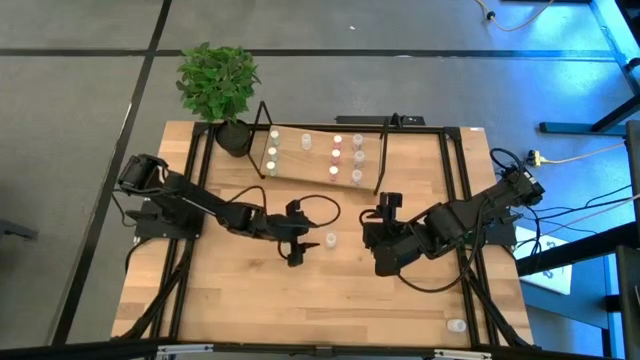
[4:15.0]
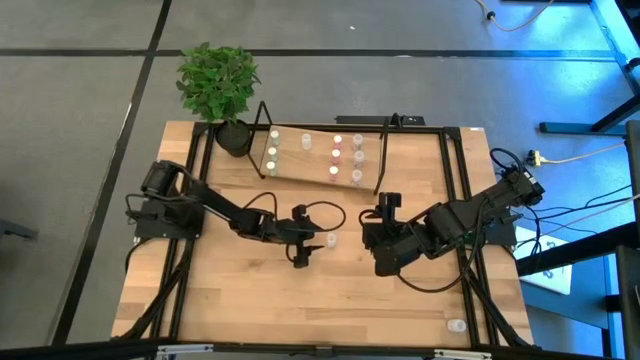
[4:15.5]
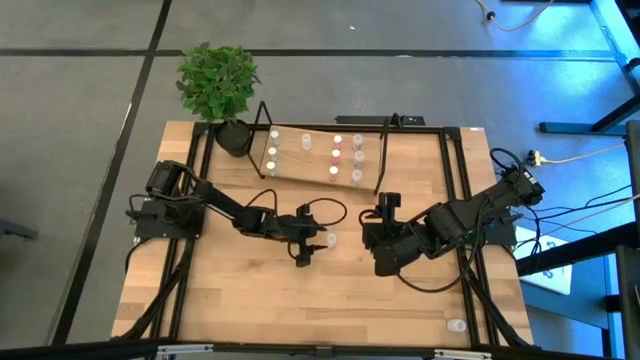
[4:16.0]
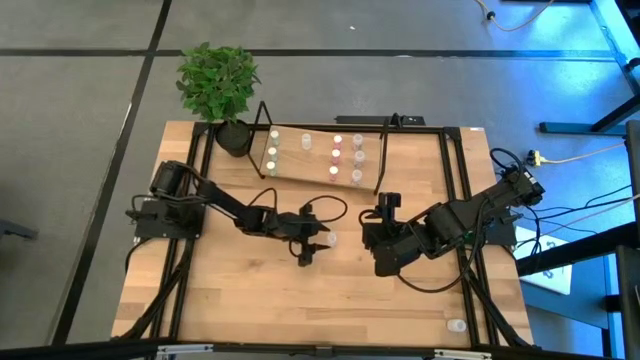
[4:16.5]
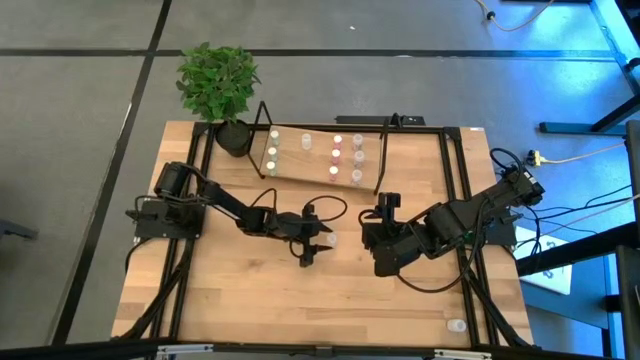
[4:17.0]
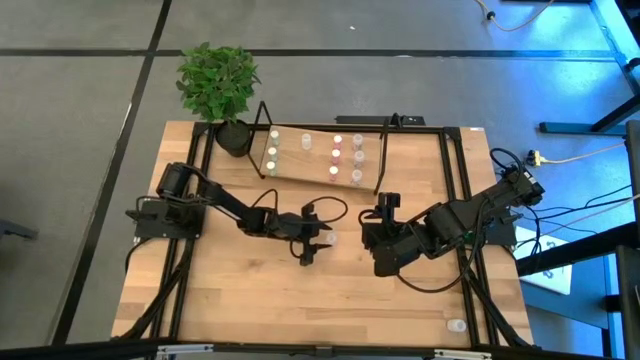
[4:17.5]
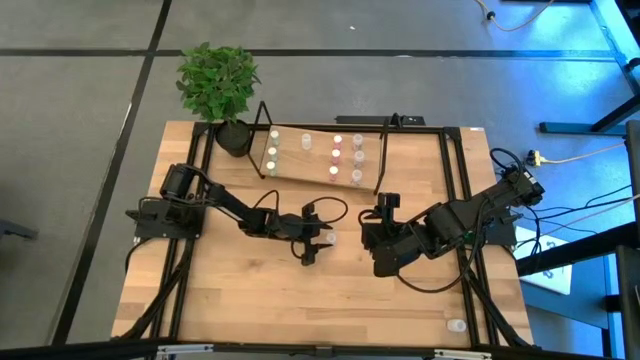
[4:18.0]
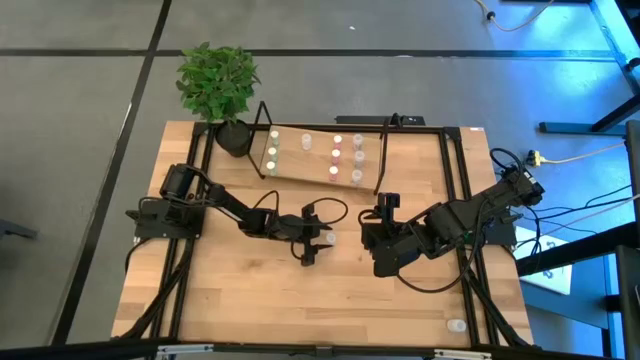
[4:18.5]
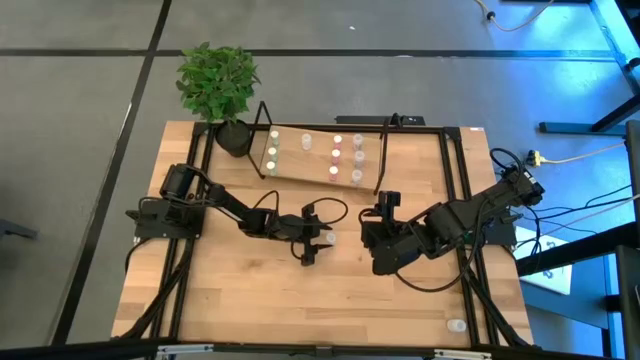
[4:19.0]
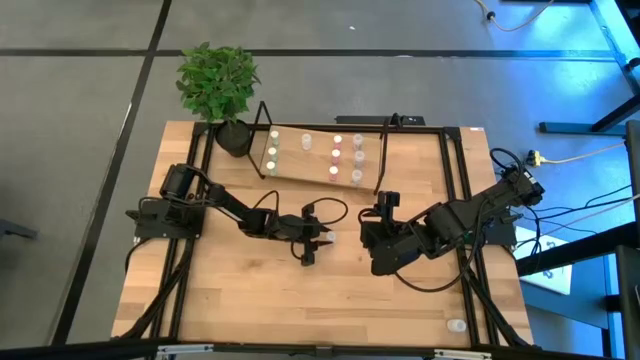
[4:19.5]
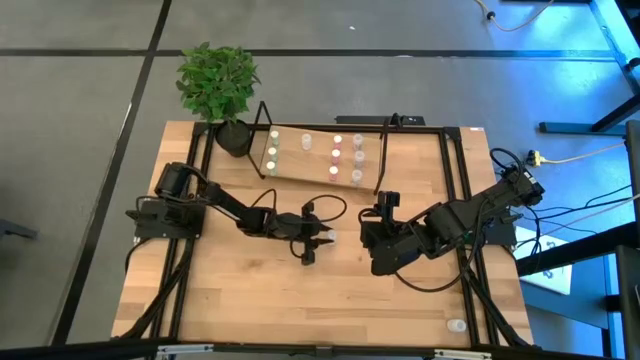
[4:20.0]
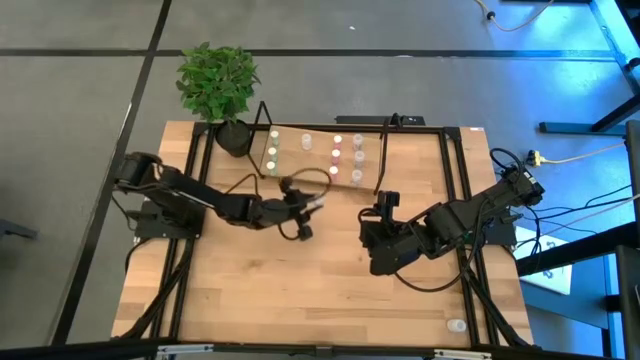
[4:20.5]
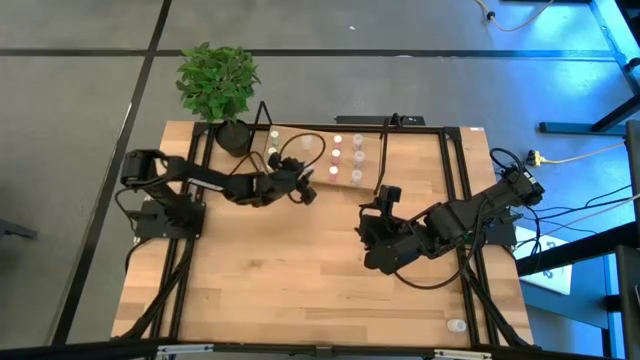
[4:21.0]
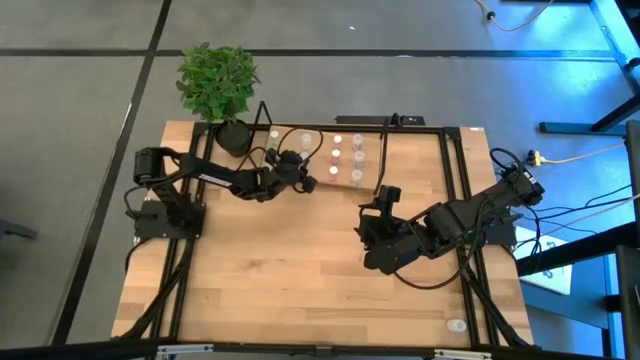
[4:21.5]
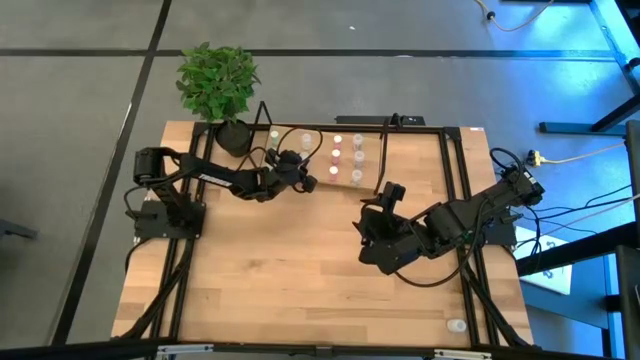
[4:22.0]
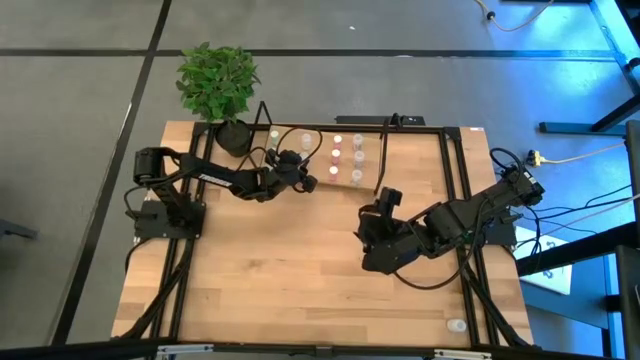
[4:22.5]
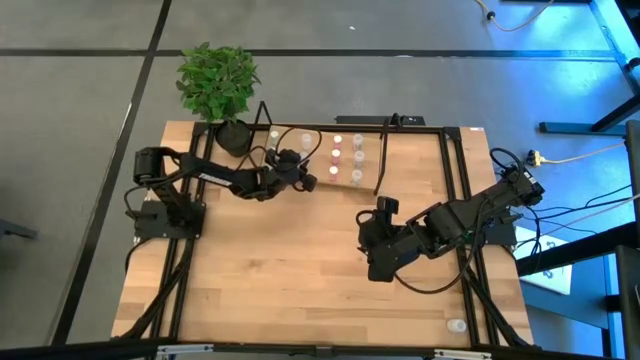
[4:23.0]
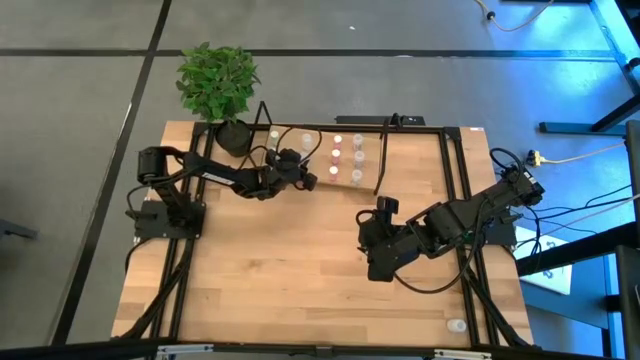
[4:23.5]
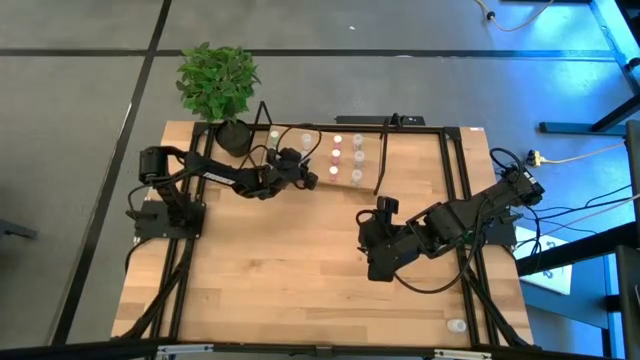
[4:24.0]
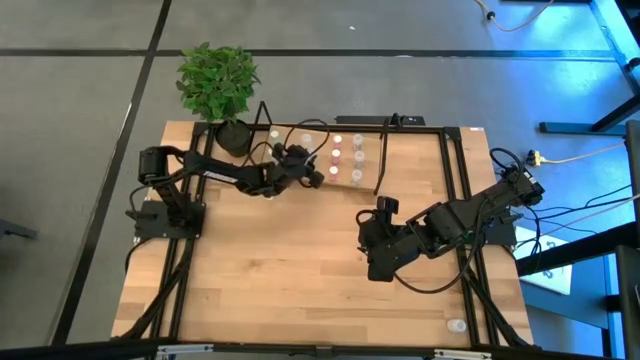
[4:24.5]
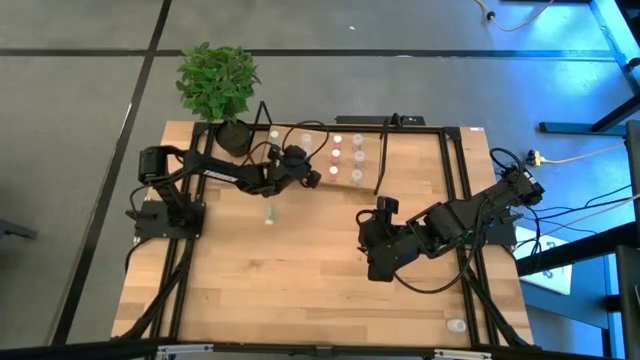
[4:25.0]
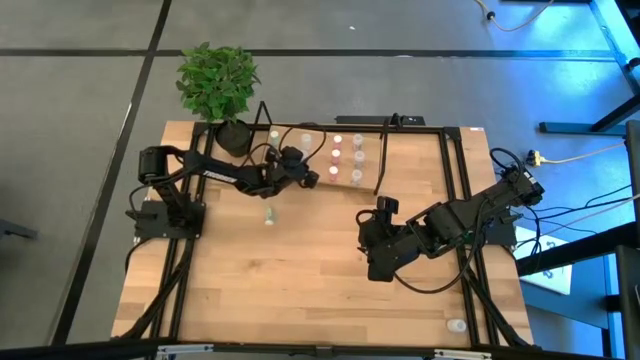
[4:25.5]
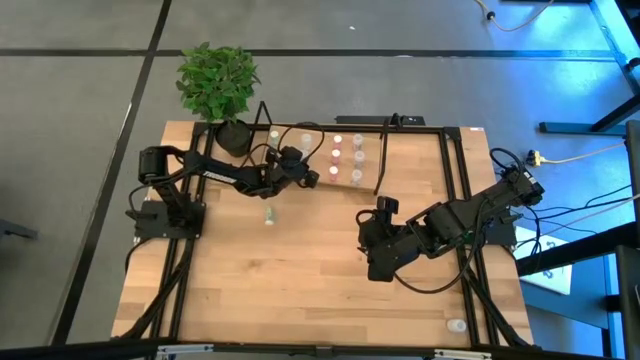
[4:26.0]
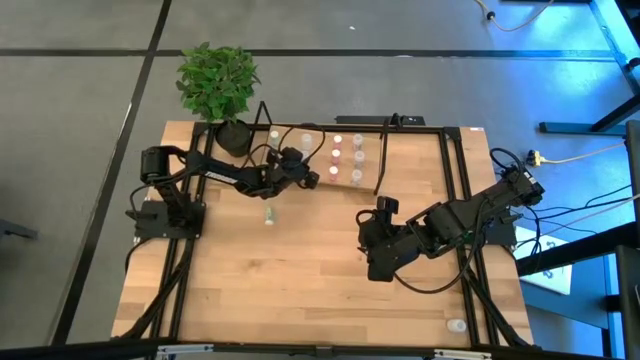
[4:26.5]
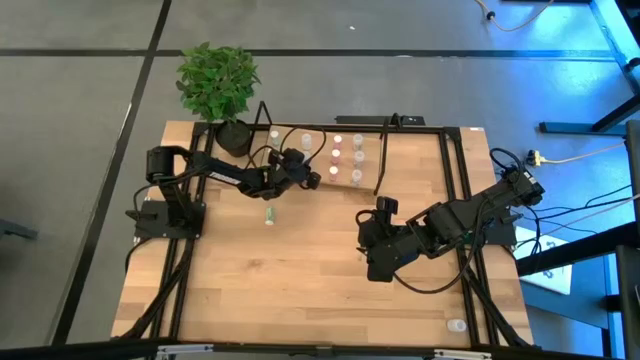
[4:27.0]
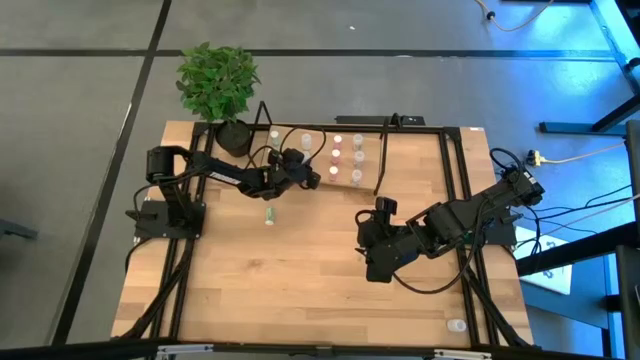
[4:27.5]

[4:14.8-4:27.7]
Task: Pick and place medicine bottles onto shelf by color
Put the top white medicine bottle on the shelf aligned with the other white medicine bottle

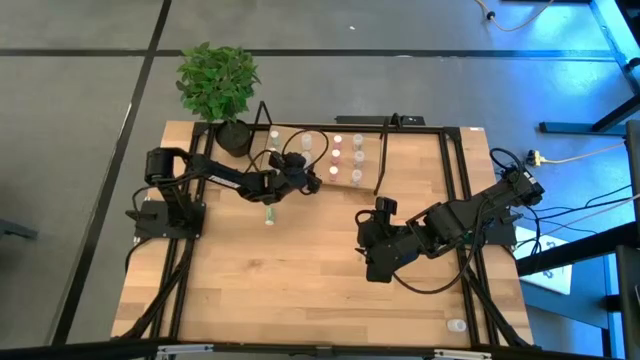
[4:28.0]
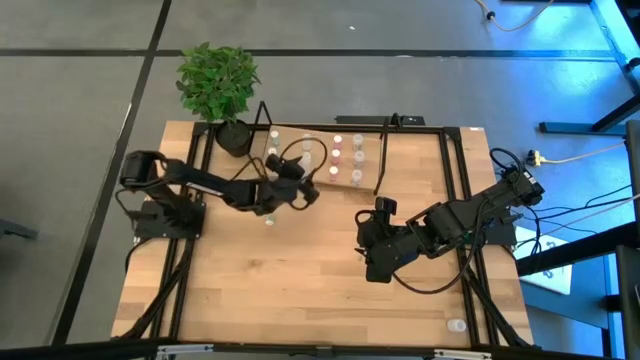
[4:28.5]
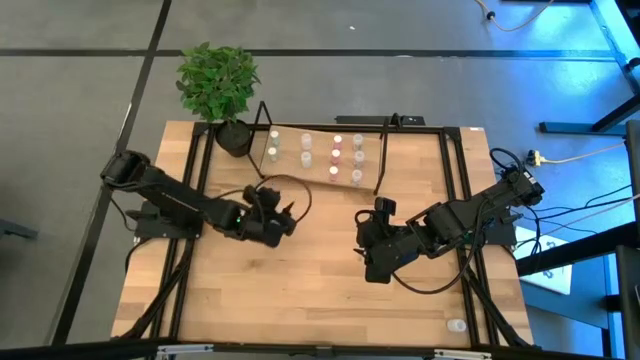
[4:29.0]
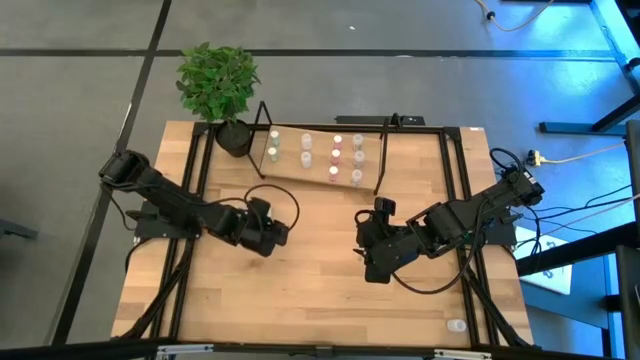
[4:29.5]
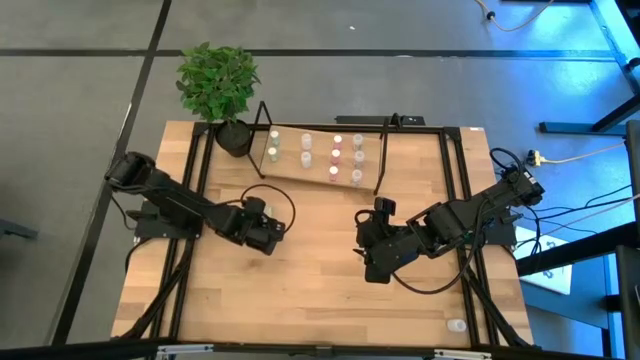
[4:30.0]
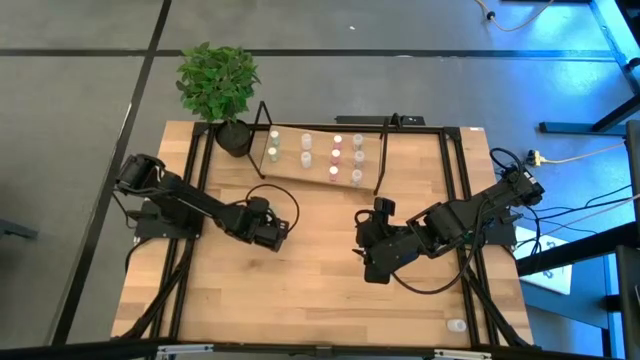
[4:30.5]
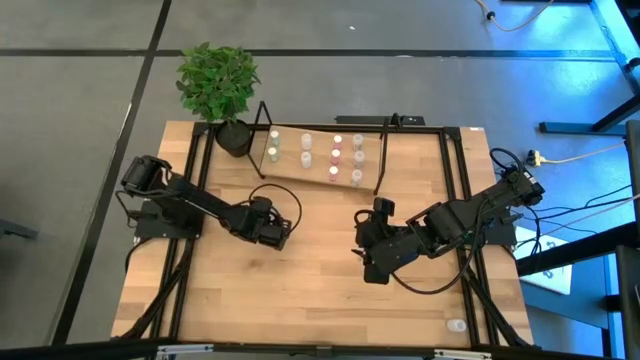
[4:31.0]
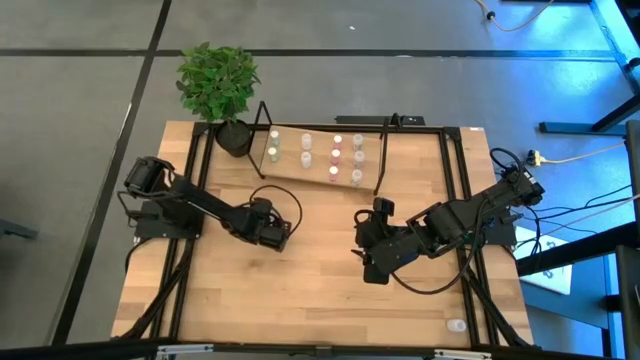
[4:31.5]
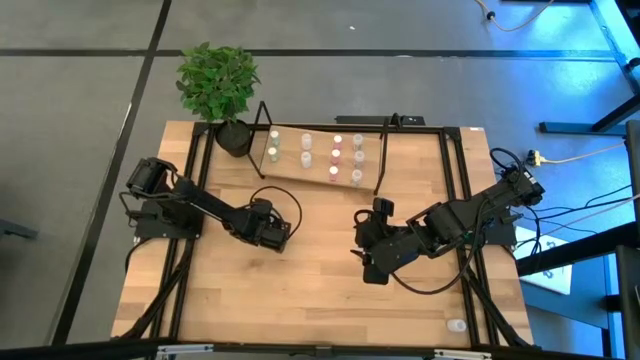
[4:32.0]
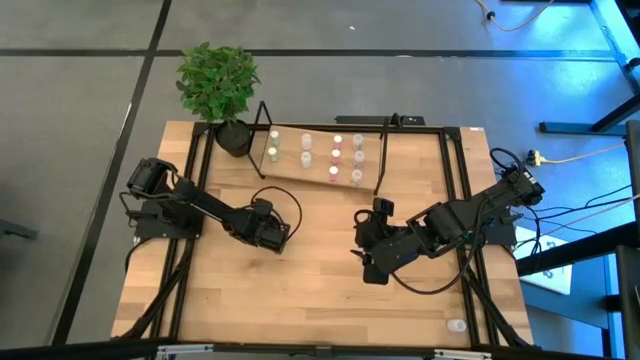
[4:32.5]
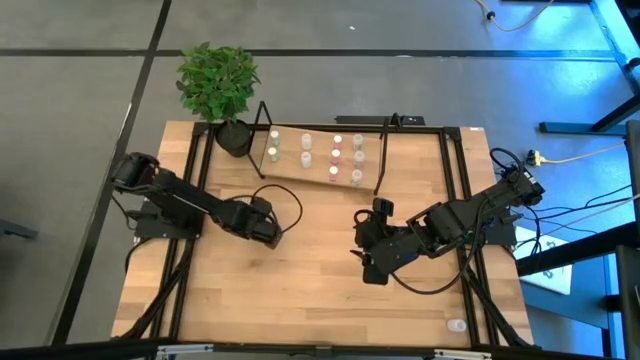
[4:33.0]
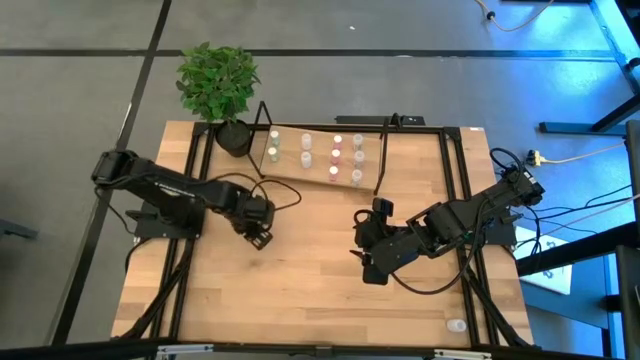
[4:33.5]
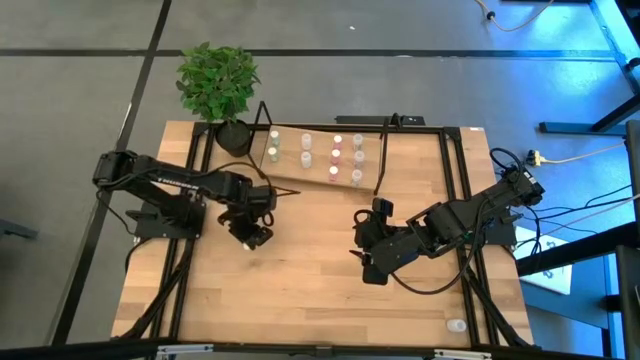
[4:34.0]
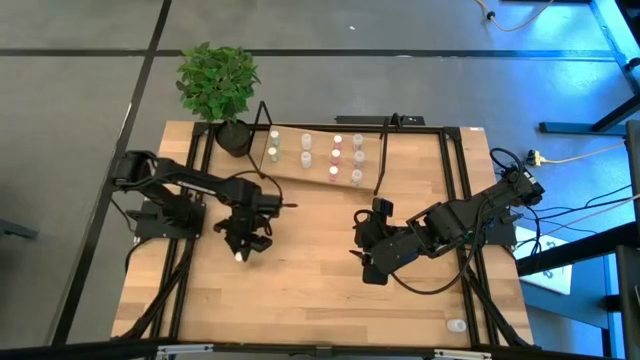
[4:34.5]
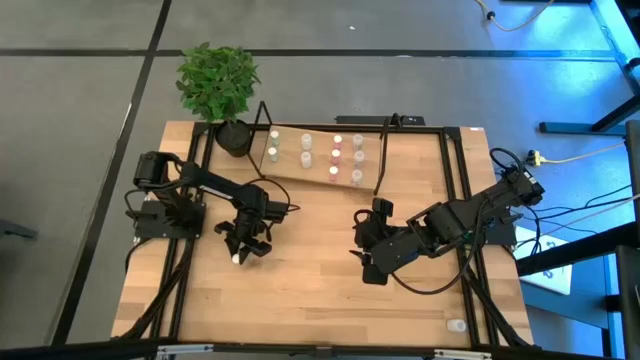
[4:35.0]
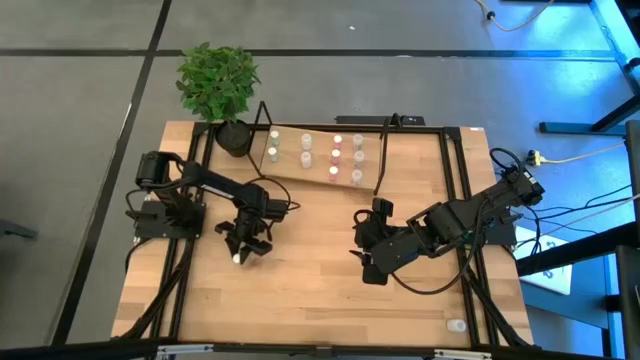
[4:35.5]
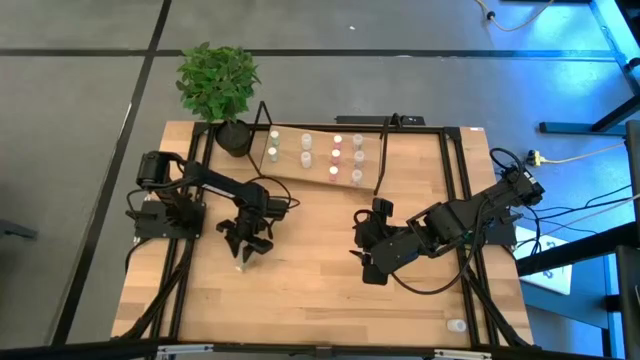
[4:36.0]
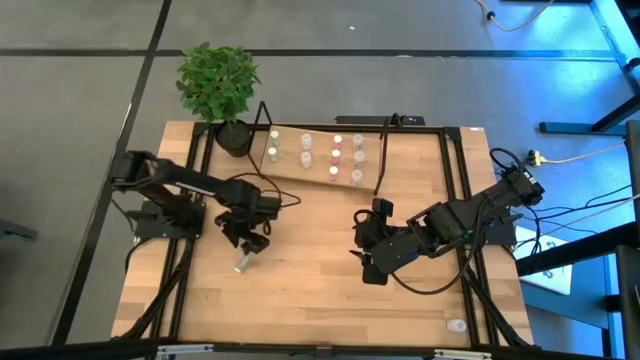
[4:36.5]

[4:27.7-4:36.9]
Put the blue medicine bottle on the shelf aligned with the other blue medicine bottle
